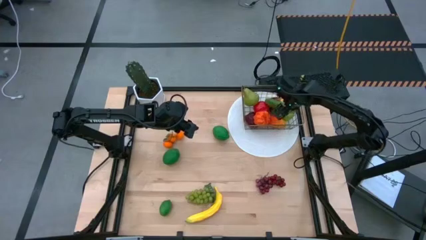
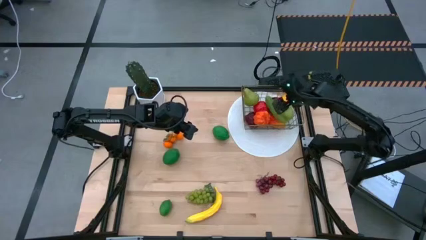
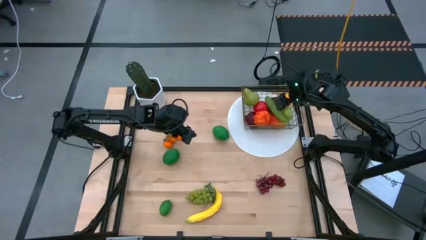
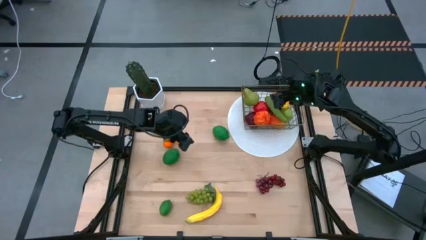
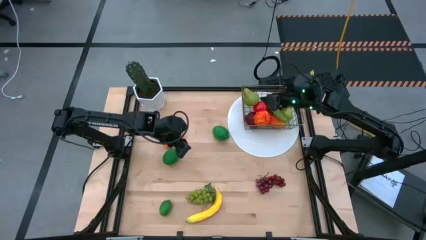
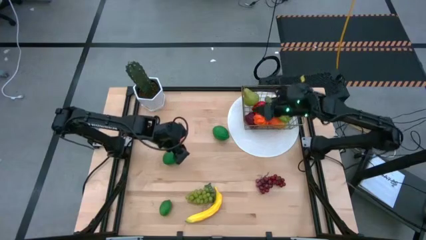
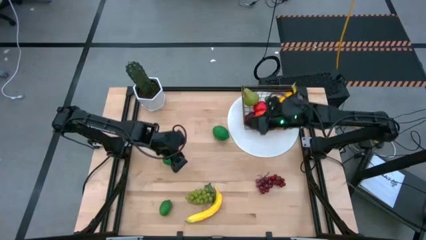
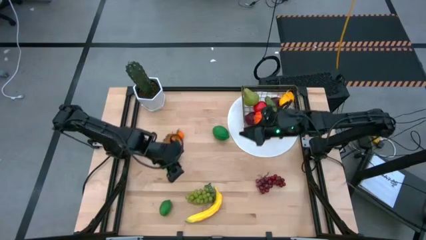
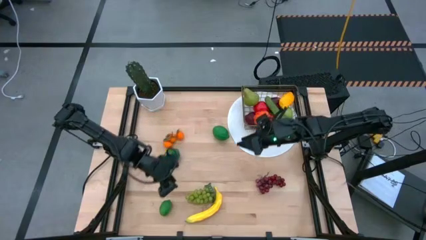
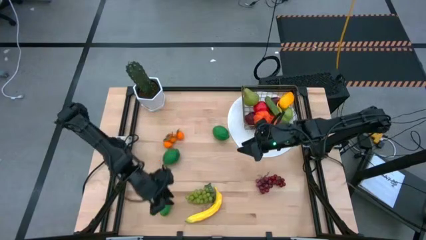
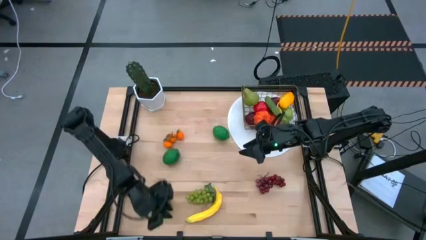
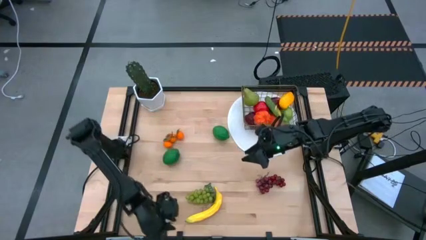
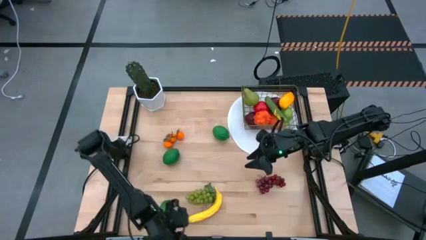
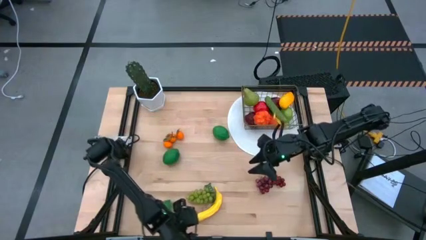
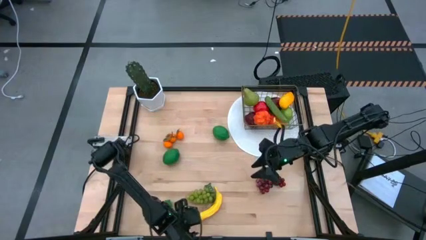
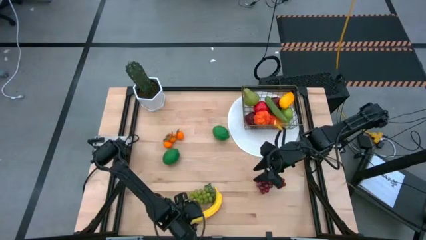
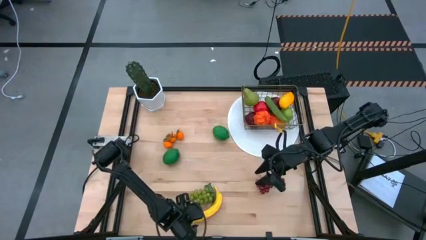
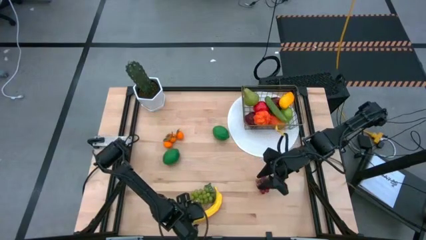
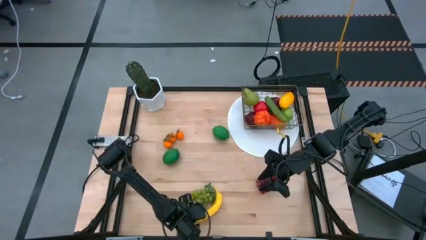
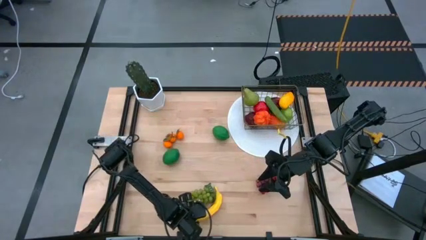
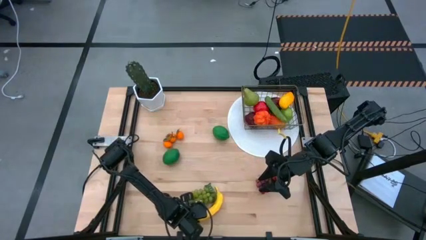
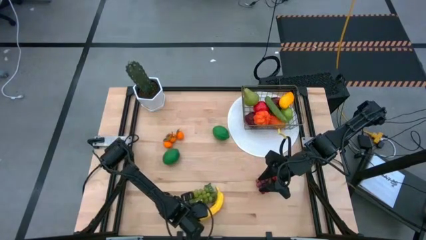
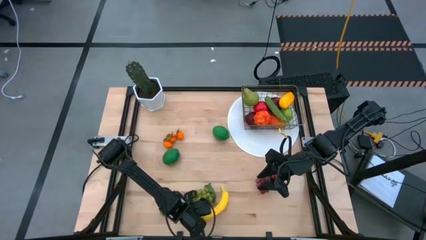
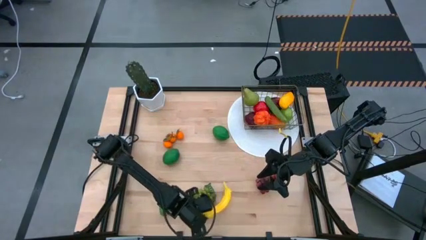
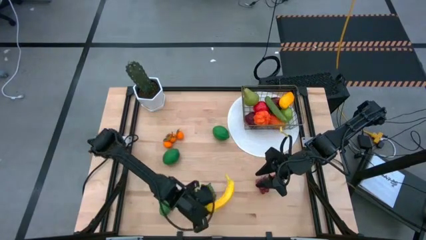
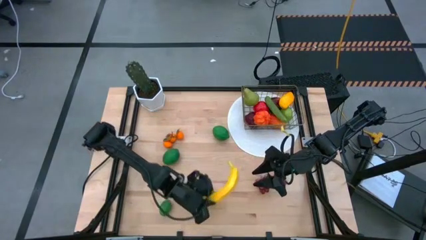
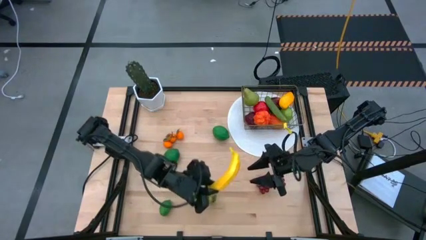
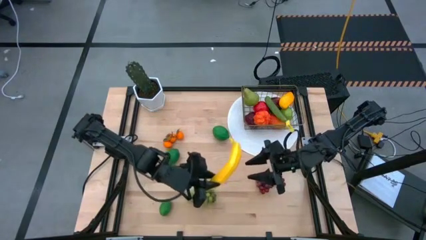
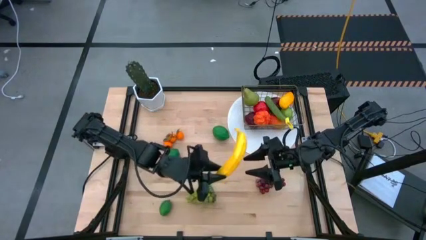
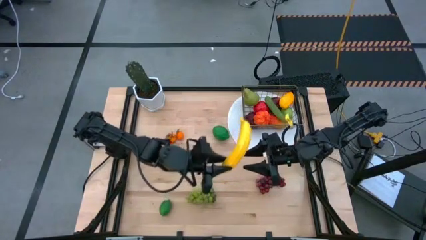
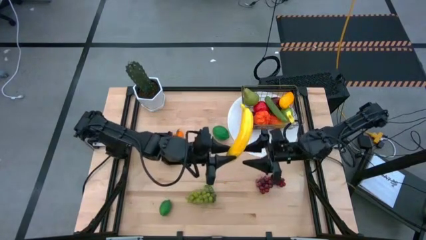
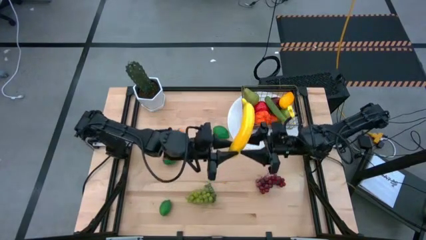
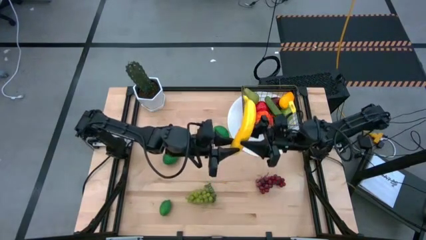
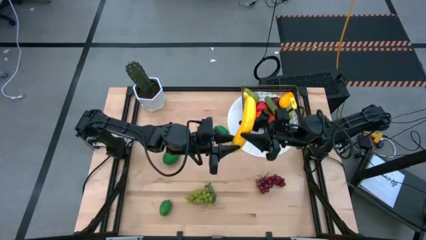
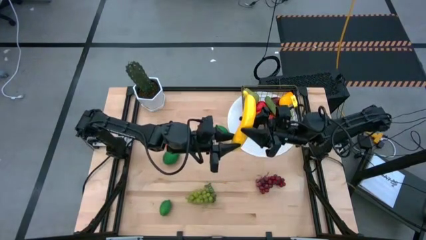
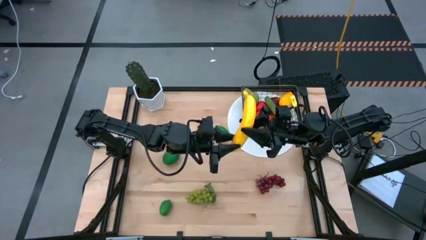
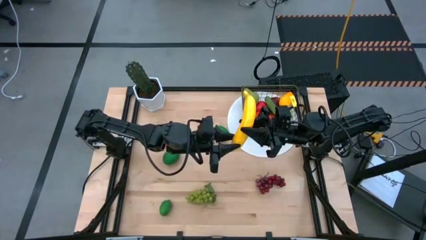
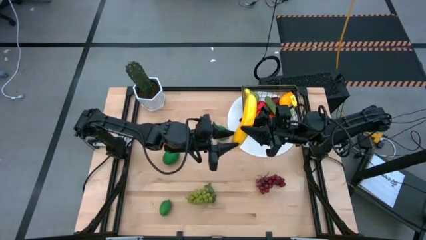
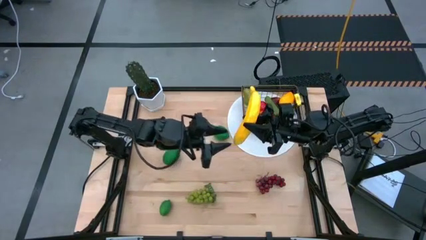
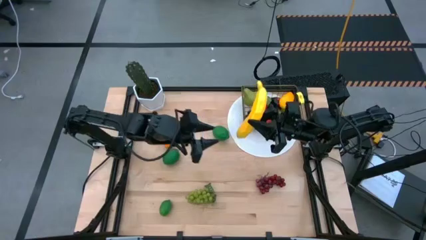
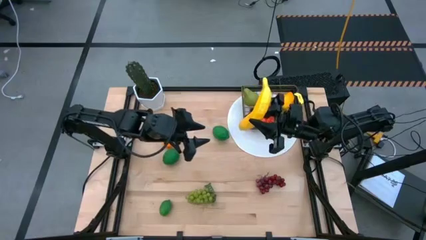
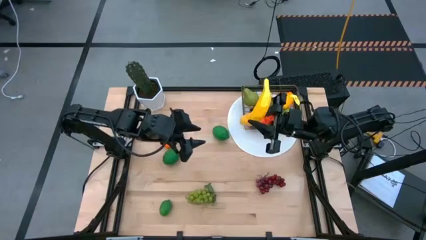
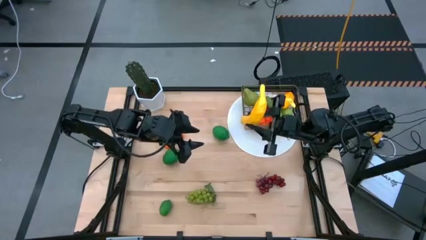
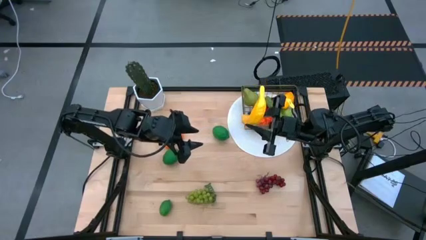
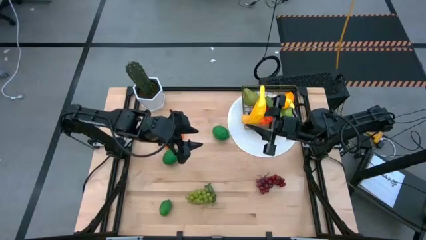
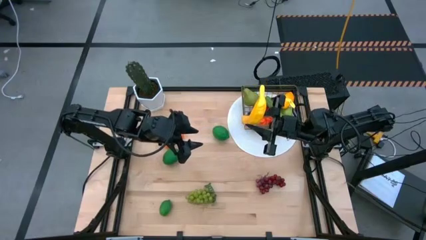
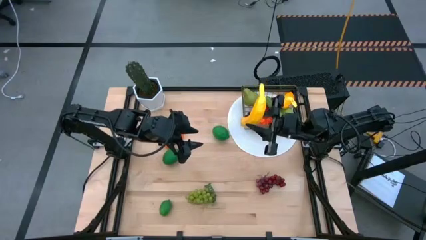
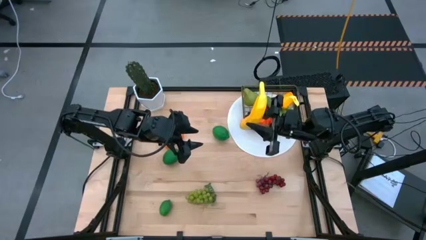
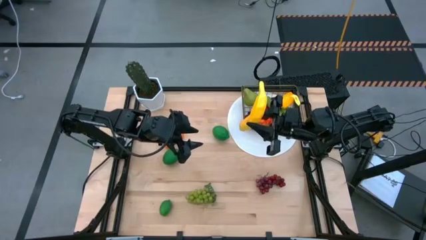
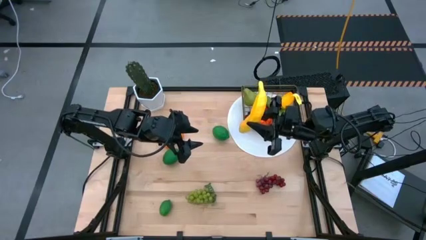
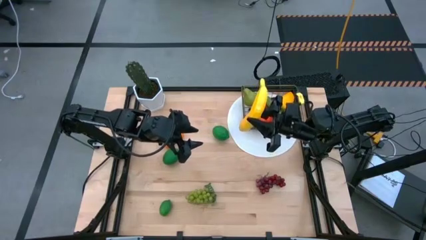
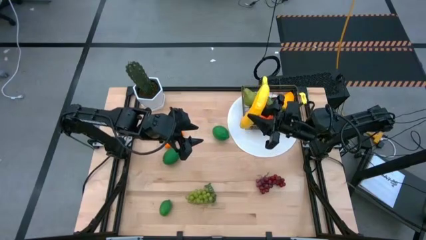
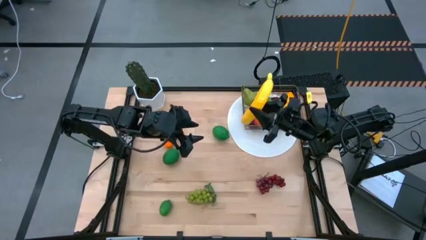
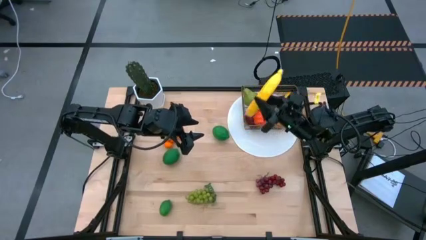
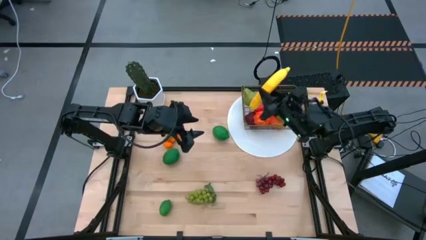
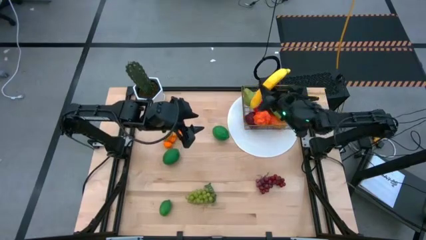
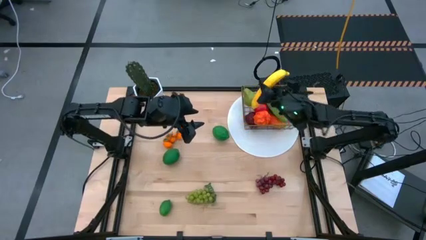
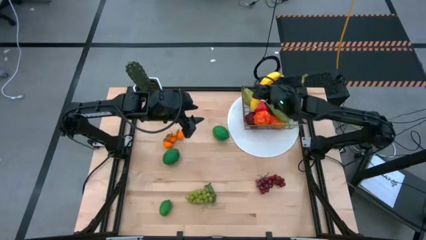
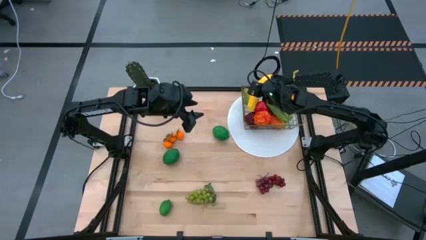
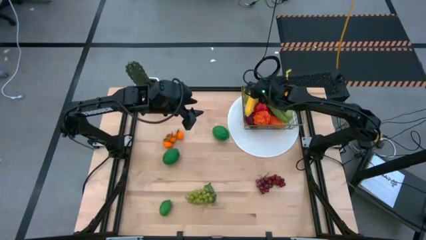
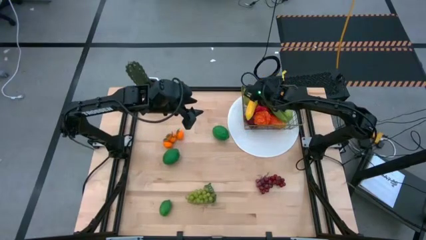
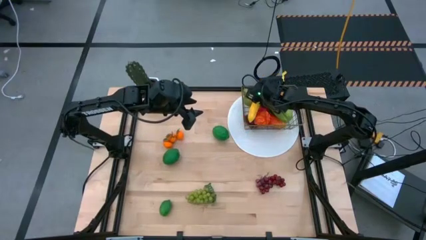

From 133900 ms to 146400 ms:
Task: Build produce basket
Put the yellow banana into the gold wire basket
